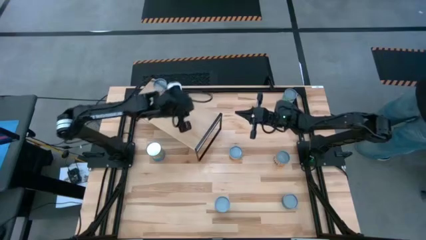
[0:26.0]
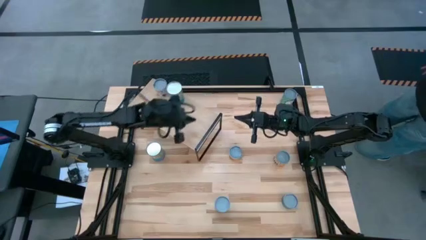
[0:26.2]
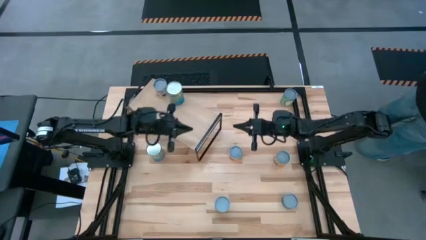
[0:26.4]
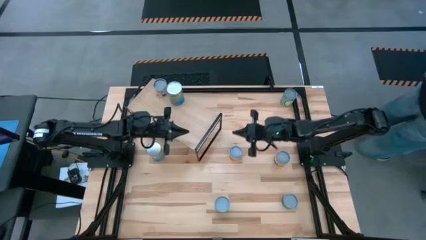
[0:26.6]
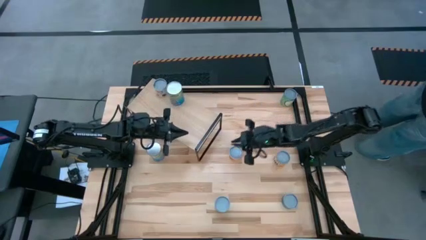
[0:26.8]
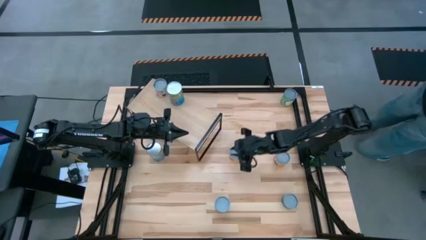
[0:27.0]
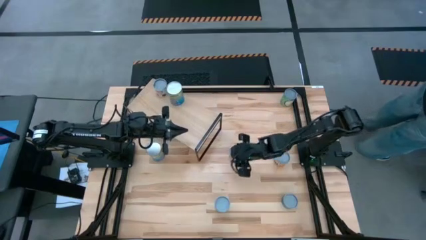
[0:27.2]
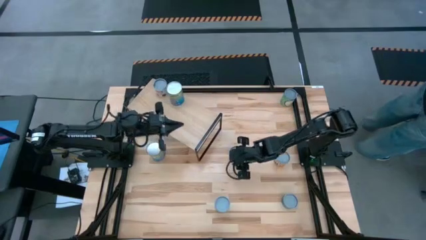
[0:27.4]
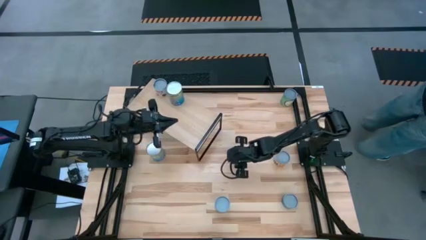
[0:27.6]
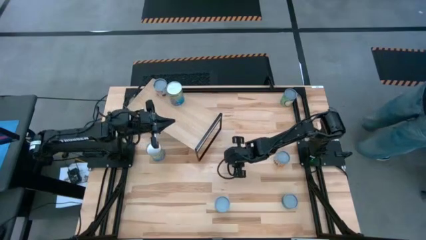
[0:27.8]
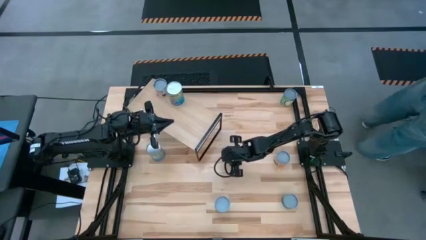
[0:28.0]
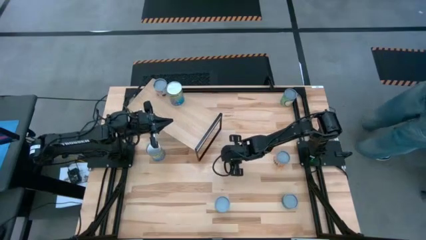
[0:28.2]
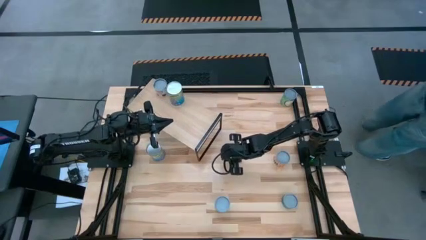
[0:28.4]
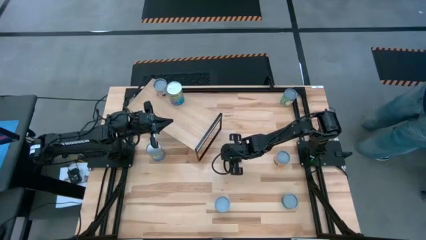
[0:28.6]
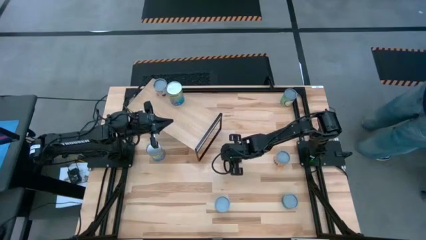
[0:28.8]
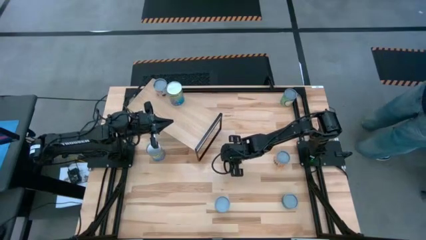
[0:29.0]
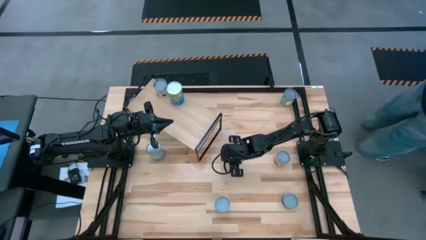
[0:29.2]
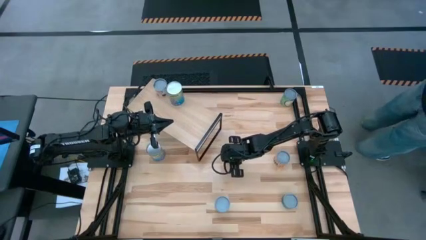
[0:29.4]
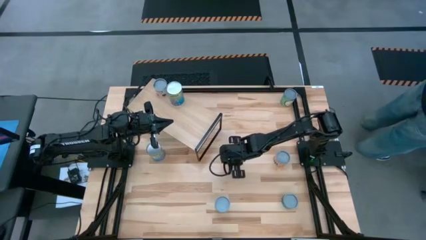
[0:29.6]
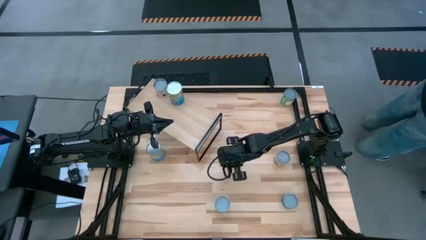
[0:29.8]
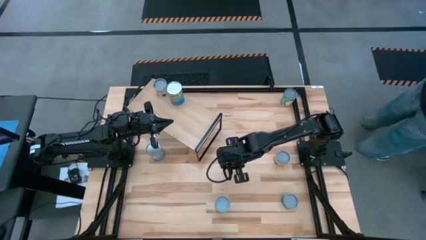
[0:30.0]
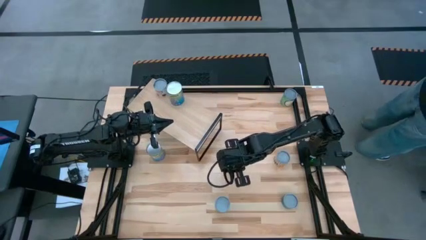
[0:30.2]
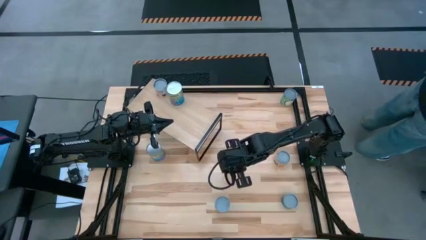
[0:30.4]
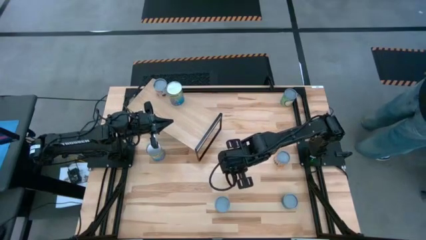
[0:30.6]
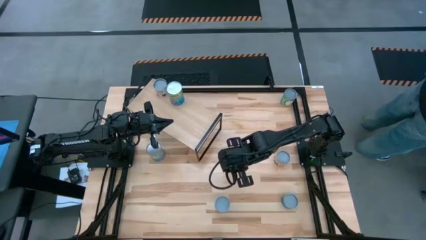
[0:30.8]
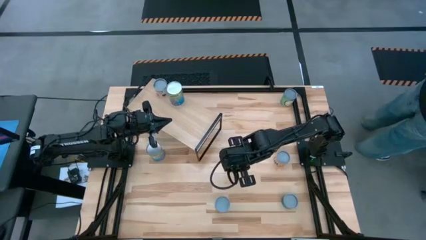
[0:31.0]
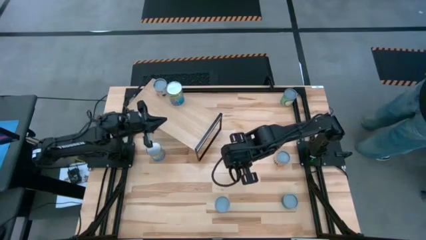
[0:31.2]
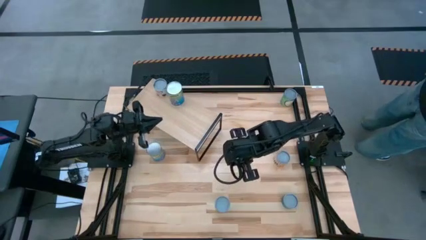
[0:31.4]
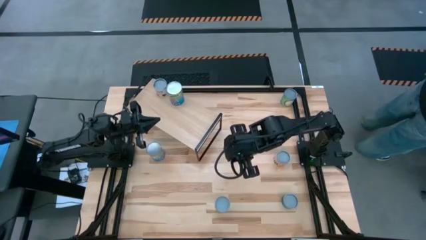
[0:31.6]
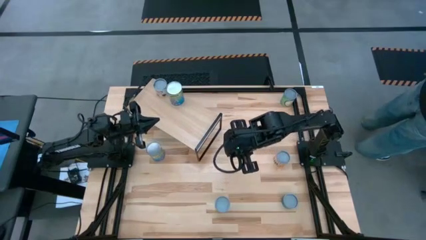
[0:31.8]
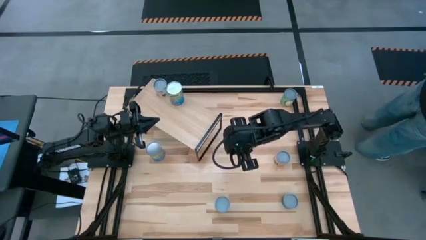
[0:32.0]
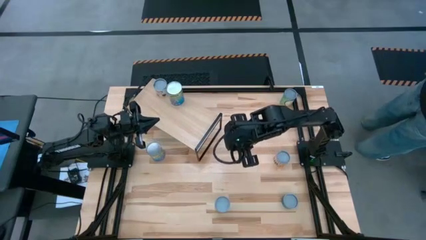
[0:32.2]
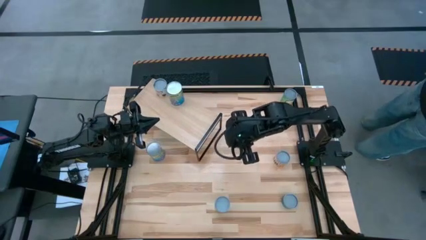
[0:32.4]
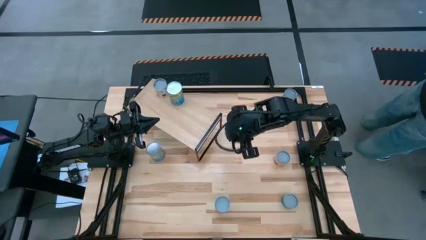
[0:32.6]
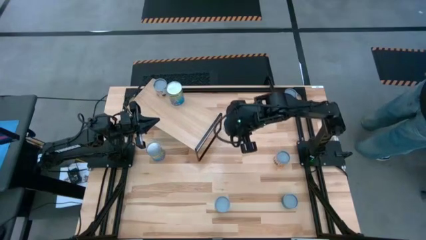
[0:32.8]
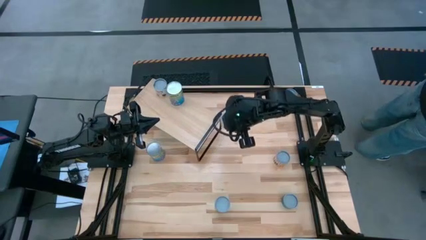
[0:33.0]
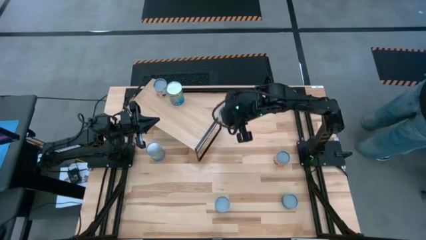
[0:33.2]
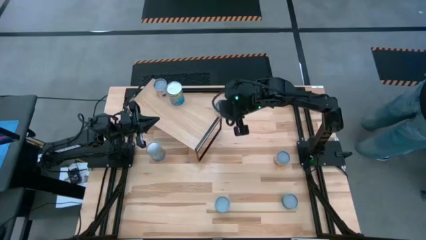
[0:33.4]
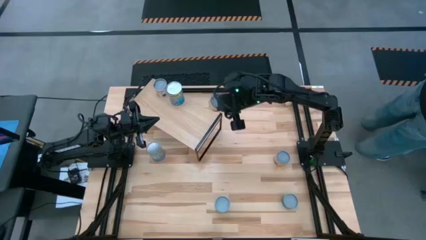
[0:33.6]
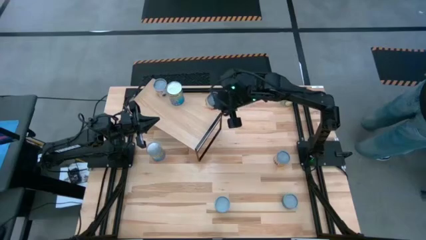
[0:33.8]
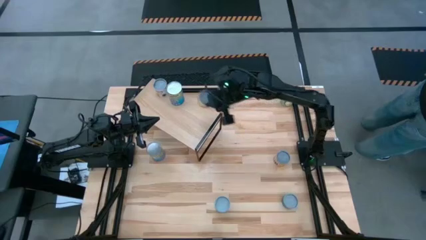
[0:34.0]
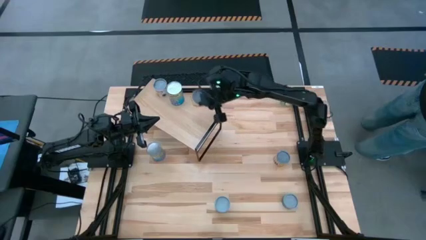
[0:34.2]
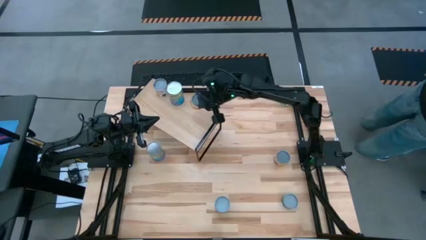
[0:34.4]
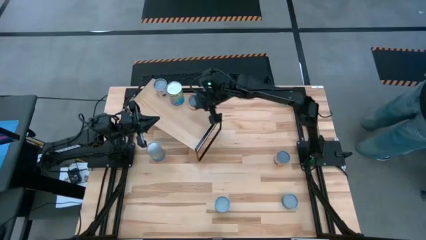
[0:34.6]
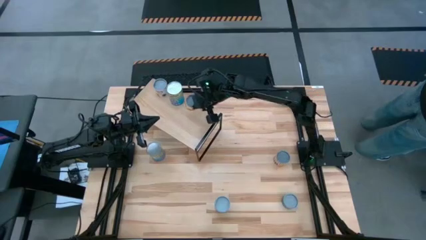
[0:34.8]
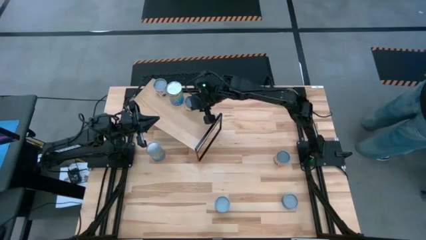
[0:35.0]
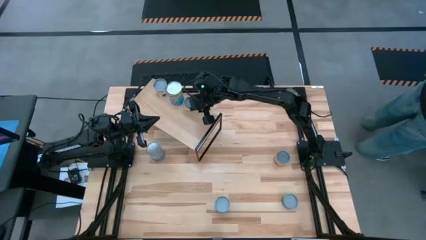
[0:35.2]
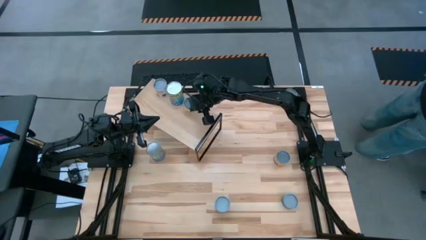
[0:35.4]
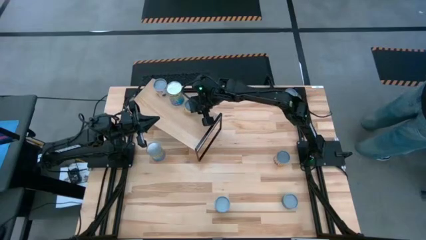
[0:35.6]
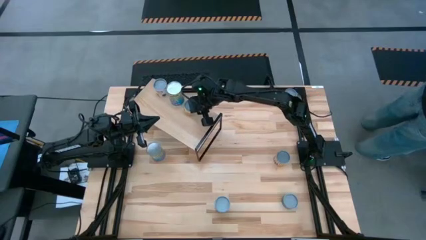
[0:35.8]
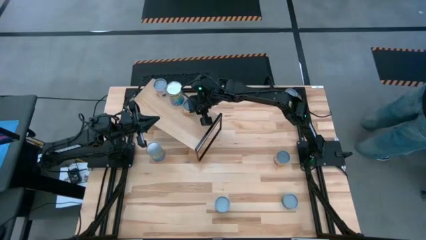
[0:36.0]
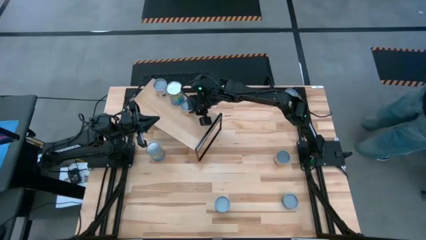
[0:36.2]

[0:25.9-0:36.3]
Task: Pick and place cans onto a shelf
Put the canned mushrooms on the shelf

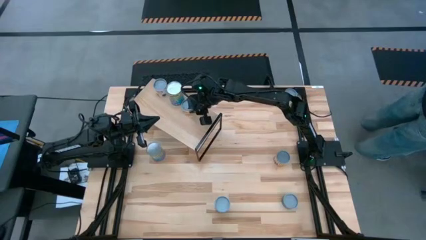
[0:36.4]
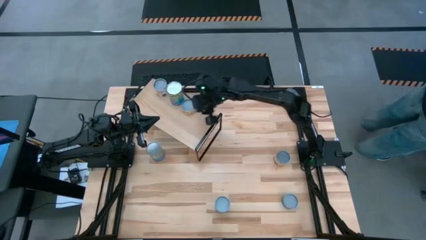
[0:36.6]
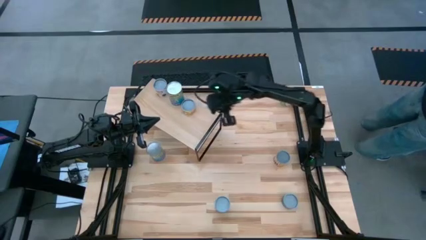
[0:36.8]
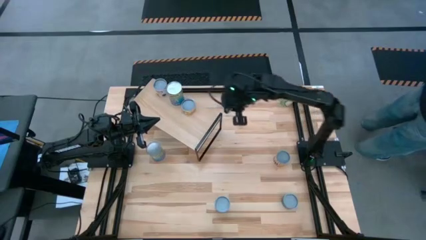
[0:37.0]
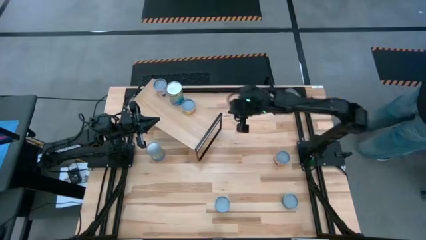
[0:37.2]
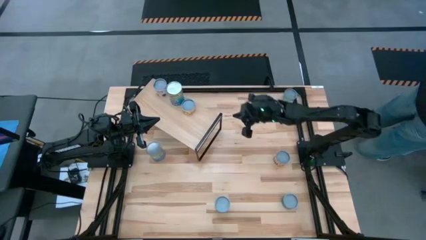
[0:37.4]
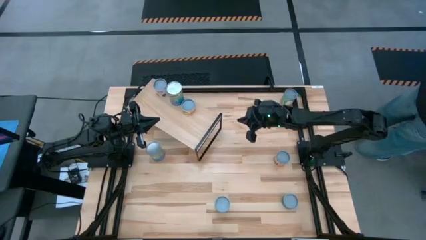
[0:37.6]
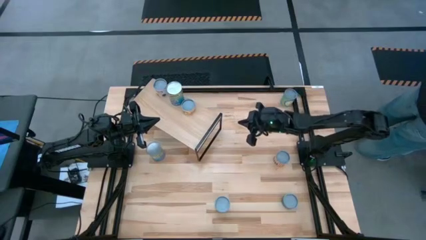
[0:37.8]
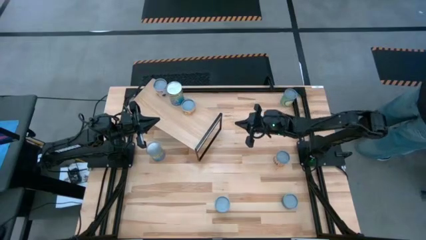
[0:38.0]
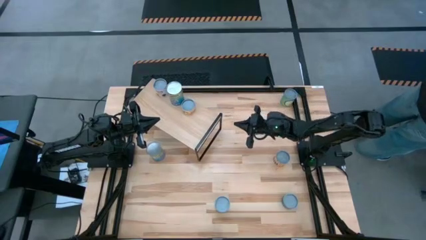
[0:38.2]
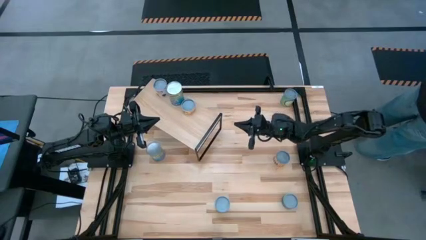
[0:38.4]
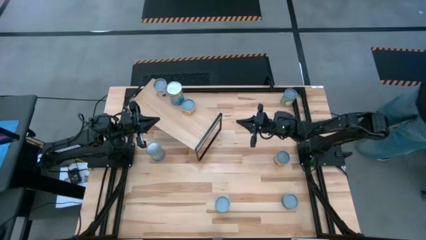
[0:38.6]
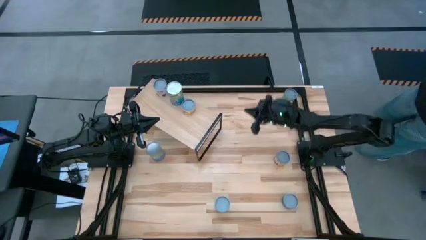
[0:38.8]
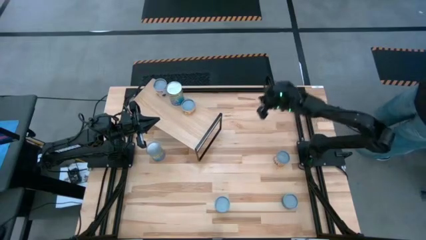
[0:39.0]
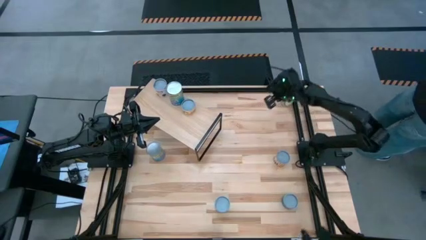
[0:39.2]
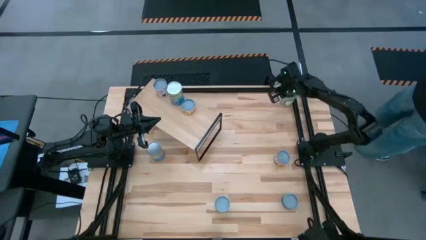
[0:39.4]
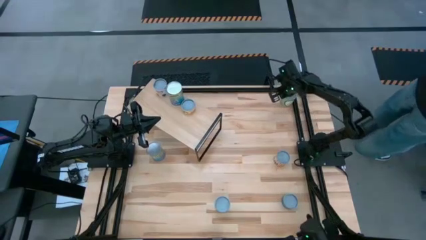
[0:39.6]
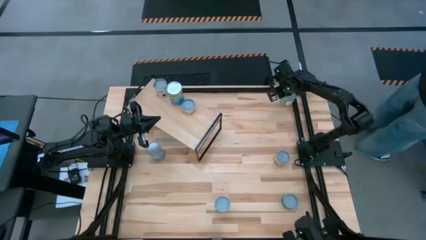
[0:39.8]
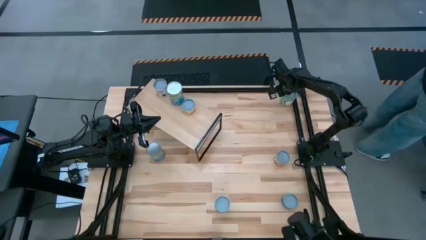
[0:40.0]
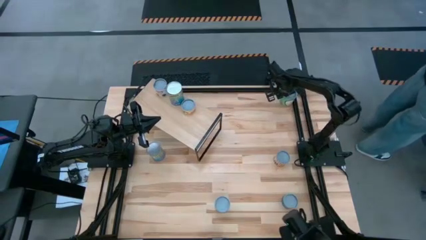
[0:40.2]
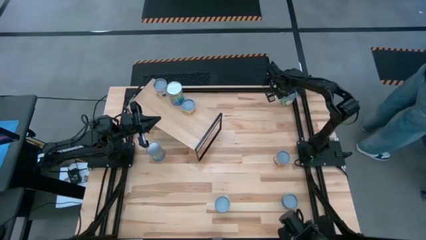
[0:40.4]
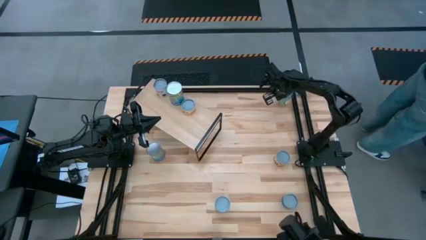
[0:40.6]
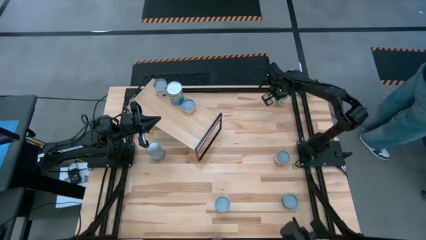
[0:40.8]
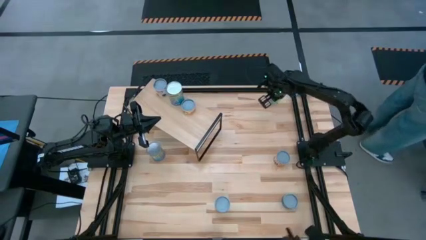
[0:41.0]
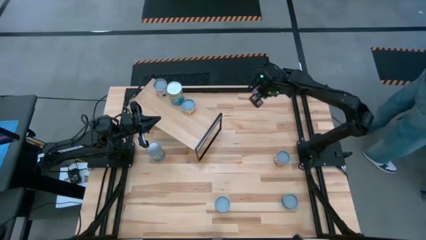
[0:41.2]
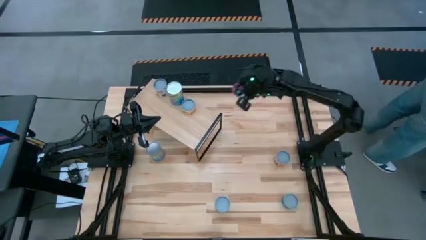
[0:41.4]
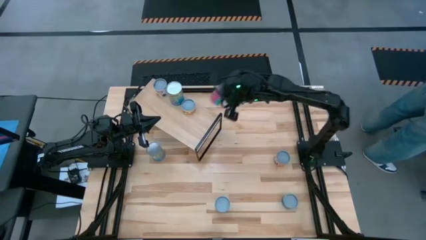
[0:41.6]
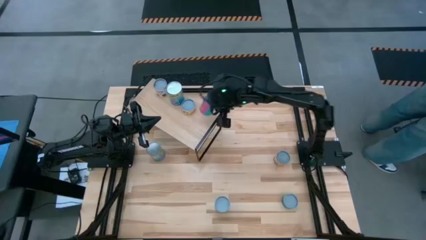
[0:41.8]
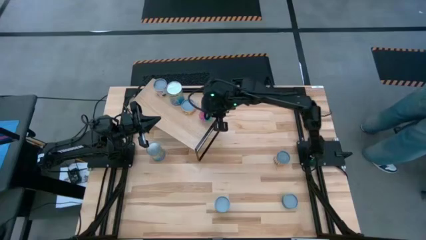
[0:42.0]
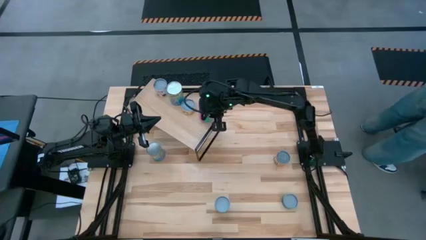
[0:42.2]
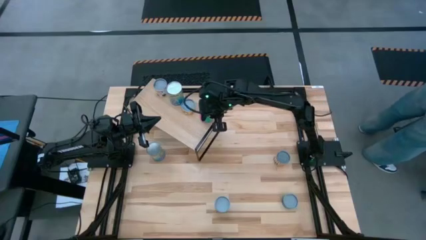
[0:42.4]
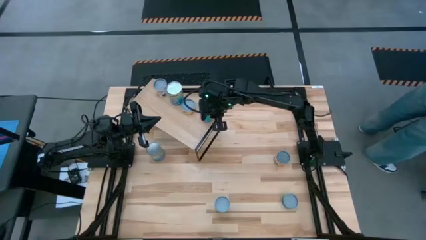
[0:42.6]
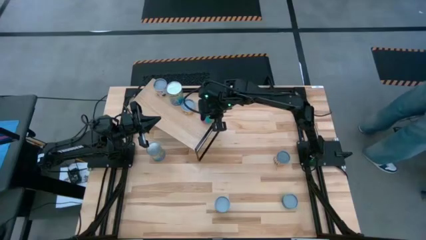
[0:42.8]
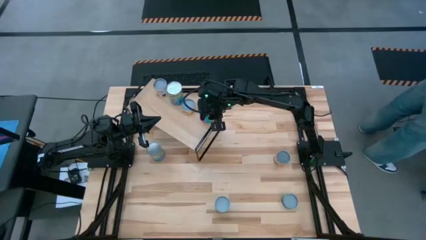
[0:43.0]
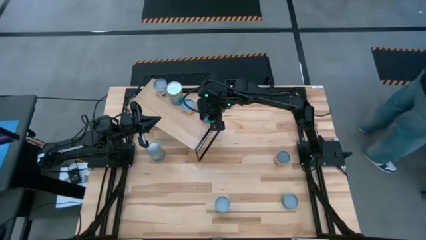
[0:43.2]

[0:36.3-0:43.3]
Put the canned chicken soup on the shelf
